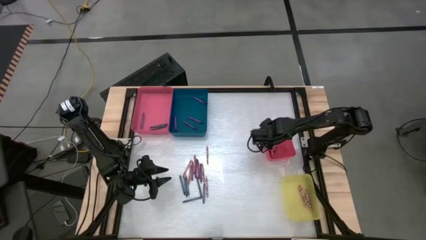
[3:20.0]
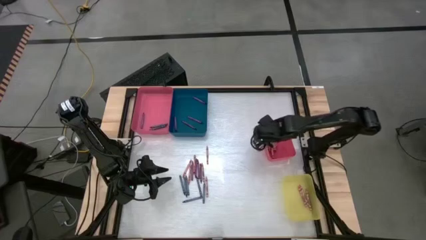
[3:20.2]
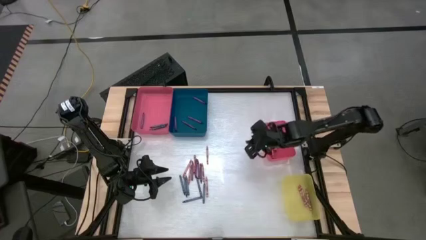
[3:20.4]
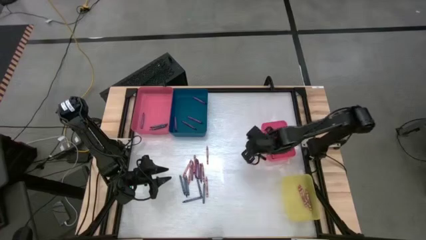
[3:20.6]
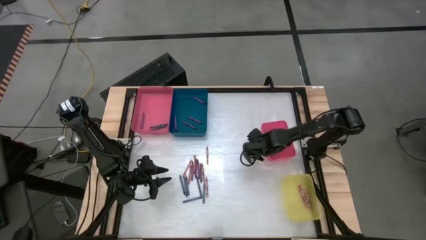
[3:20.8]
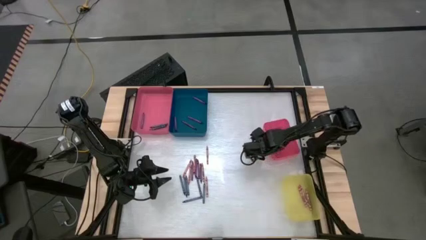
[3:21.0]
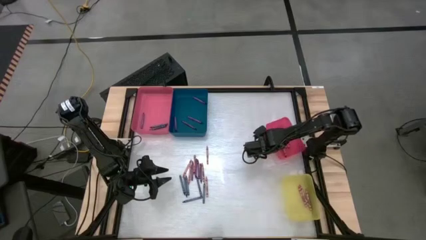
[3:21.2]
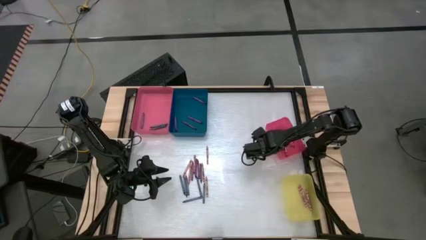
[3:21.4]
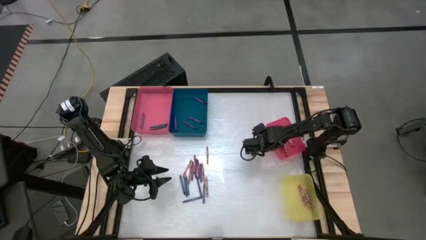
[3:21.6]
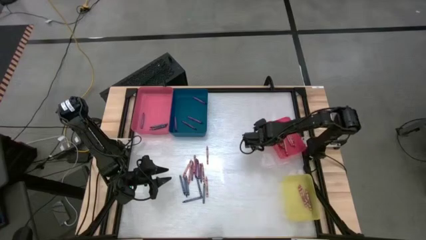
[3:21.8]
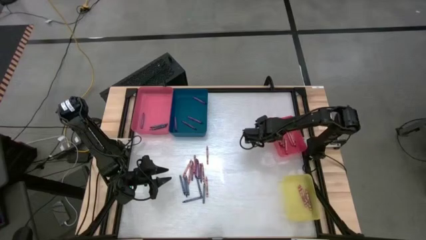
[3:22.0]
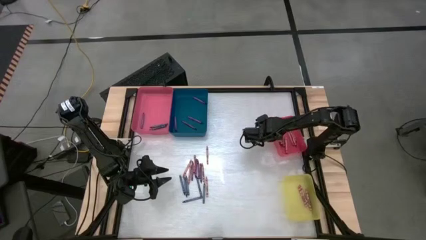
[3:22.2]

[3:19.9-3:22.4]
Task: Sort crayons
Adjust the small red bin

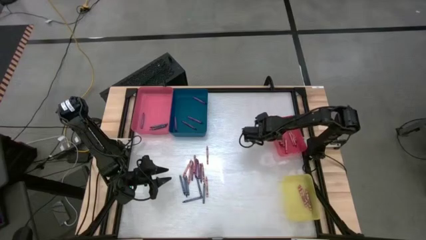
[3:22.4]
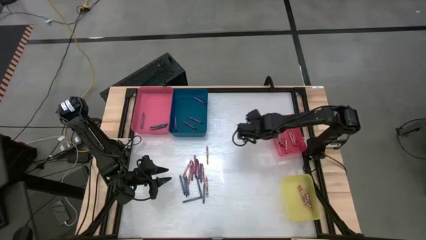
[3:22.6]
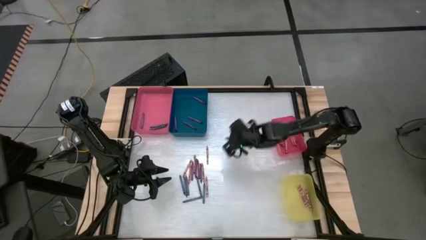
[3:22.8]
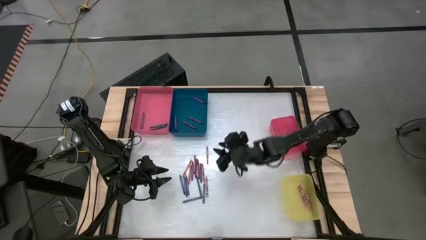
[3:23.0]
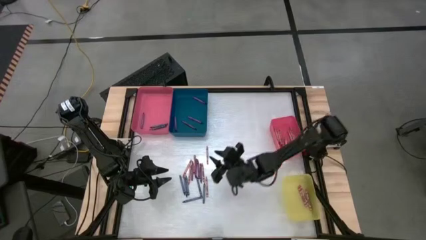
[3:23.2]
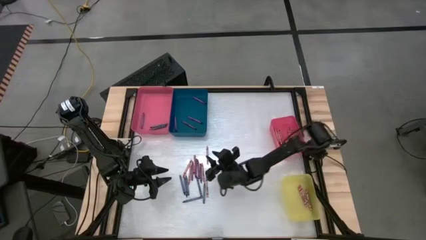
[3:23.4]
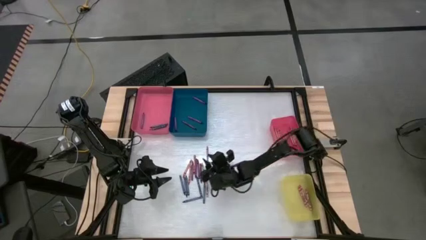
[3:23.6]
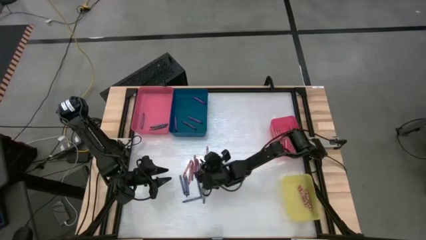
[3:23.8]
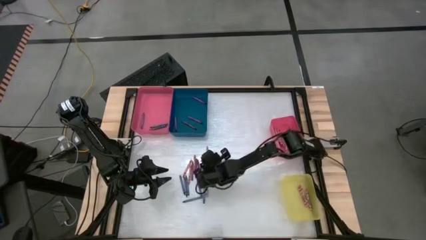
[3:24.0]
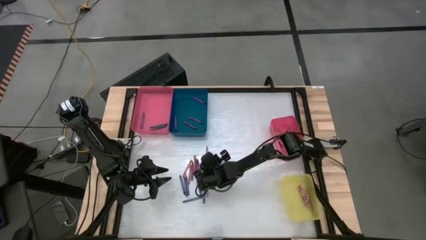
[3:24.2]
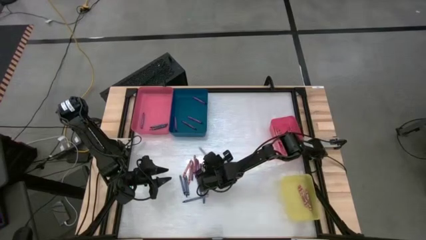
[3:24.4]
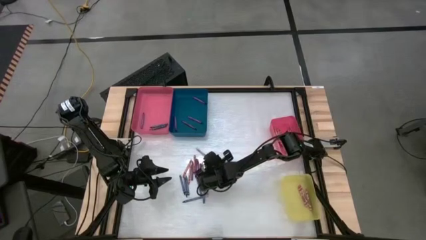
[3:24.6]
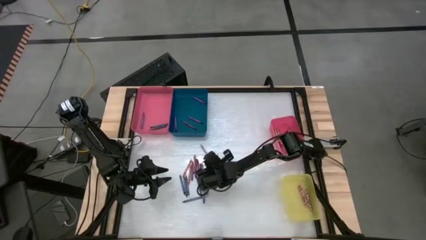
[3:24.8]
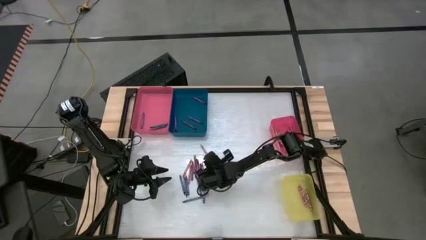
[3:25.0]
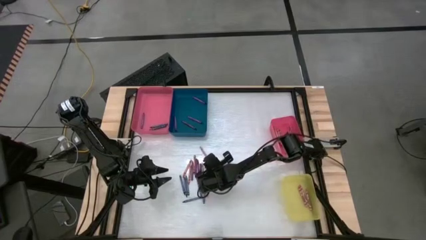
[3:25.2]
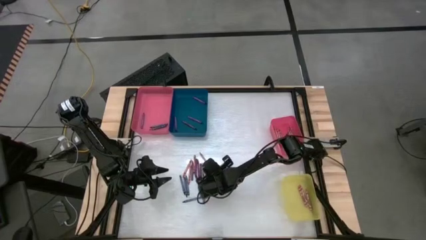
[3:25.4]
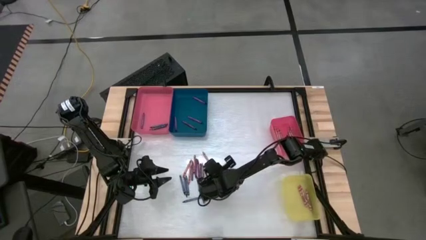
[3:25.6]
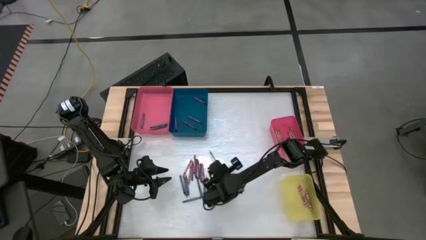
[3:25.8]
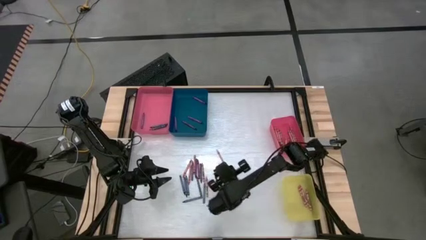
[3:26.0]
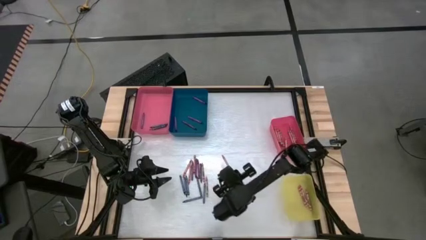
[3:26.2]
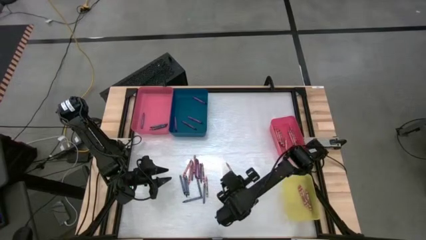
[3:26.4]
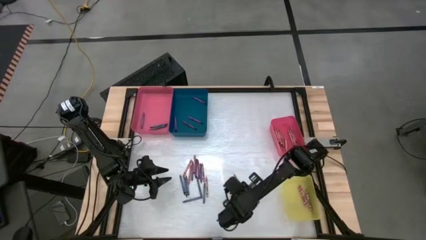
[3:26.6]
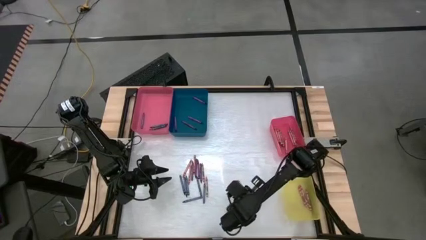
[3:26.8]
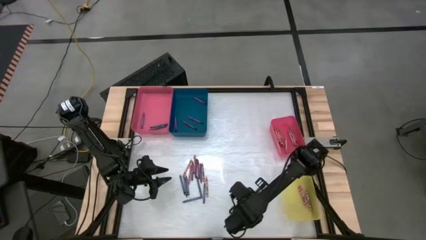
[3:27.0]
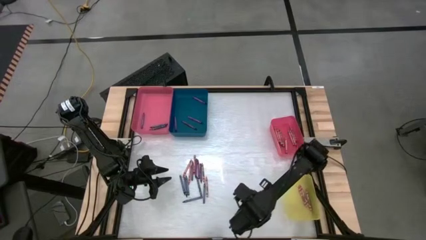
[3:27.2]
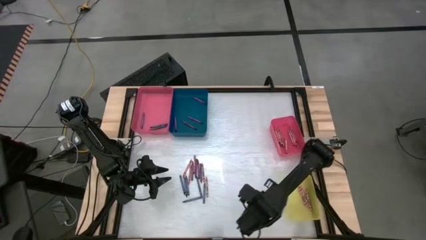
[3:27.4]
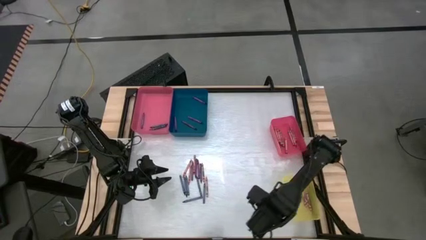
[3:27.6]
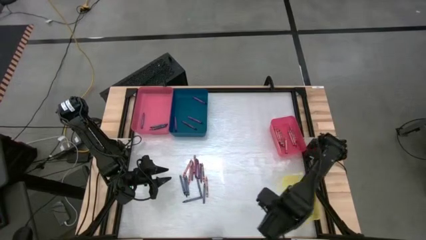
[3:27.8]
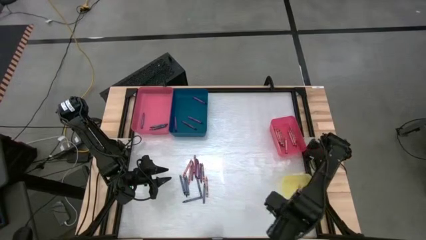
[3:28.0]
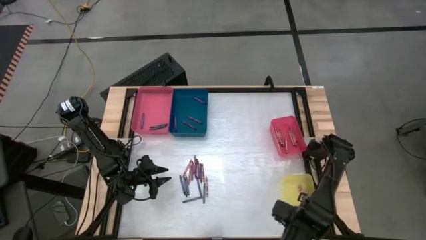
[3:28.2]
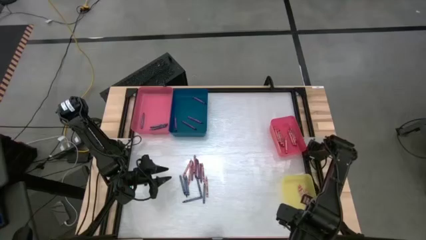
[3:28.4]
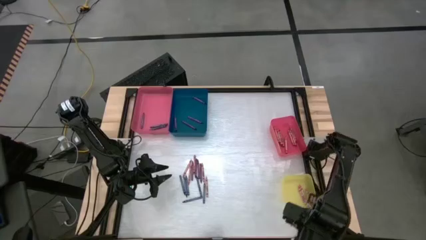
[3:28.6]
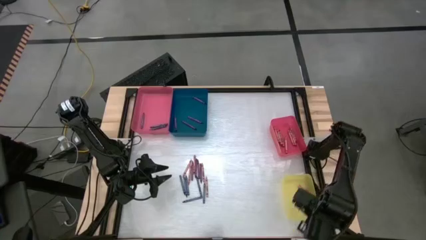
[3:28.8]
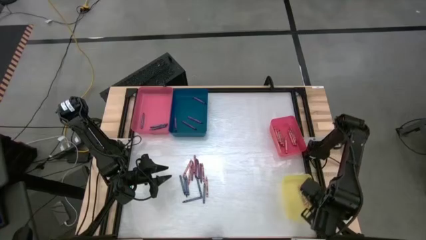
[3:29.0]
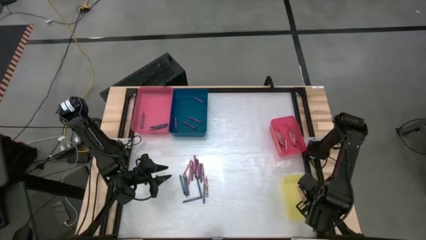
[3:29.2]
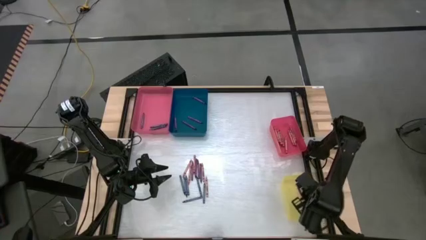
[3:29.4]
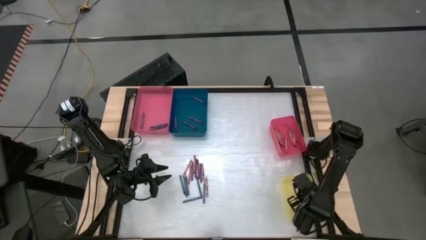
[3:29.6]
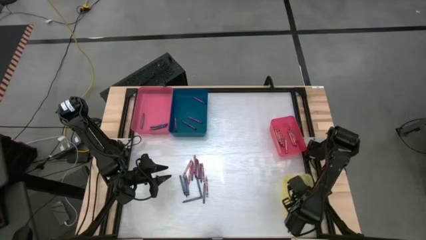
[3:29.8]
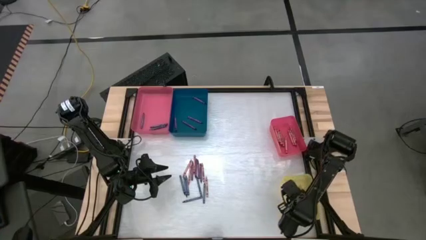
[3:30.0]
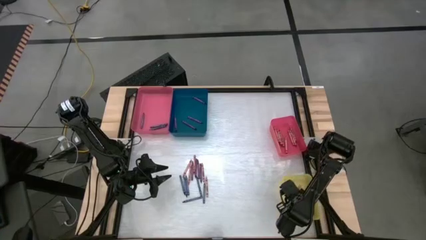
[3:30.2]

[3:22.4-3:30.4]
Put the pink crayon into the yellow bin

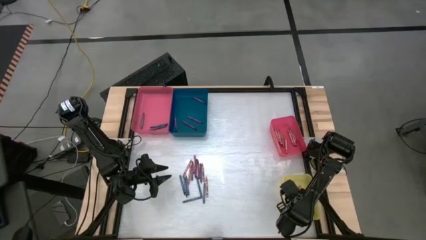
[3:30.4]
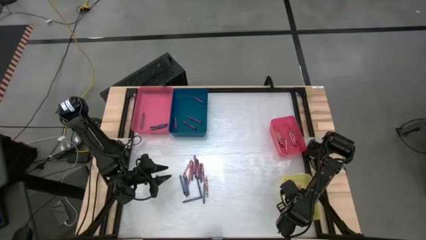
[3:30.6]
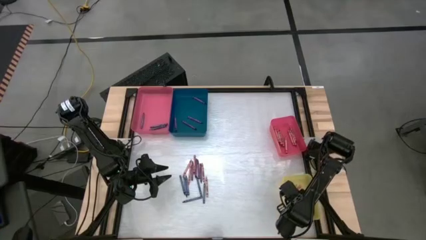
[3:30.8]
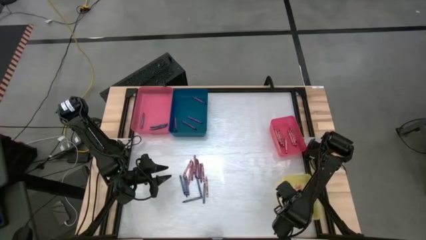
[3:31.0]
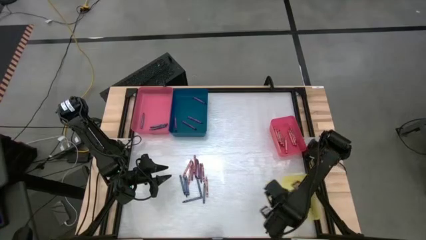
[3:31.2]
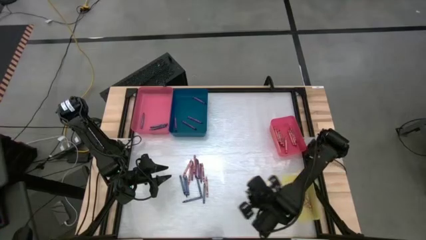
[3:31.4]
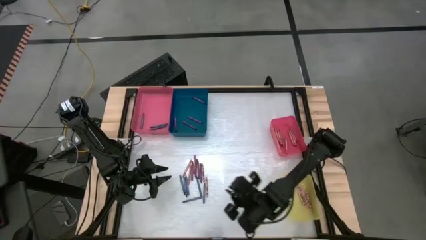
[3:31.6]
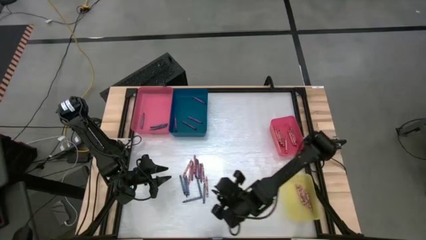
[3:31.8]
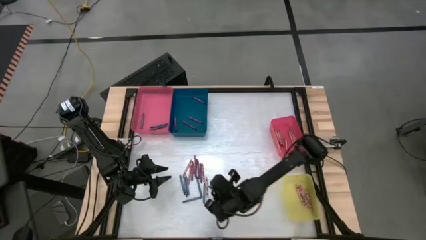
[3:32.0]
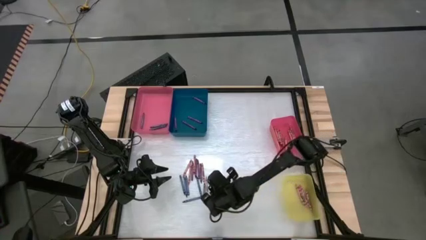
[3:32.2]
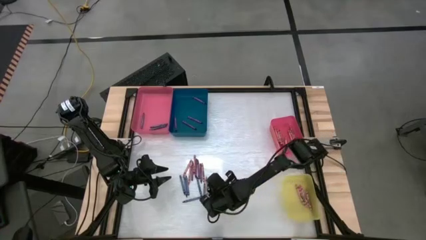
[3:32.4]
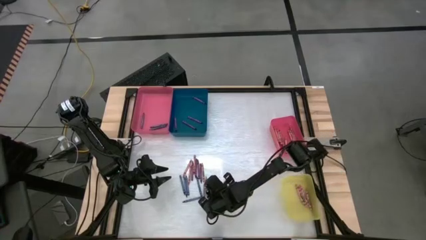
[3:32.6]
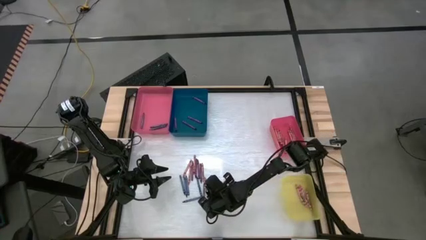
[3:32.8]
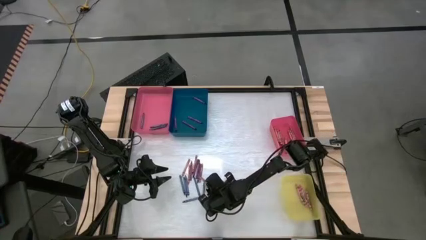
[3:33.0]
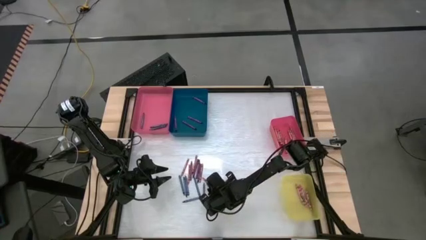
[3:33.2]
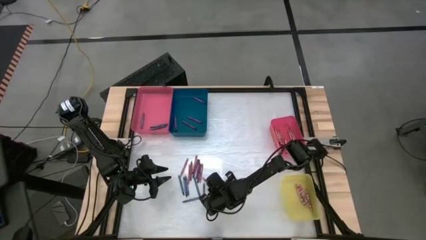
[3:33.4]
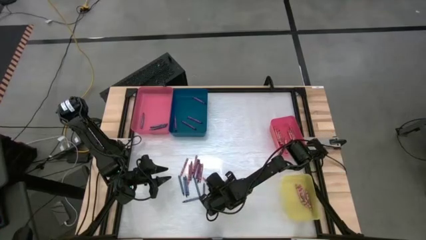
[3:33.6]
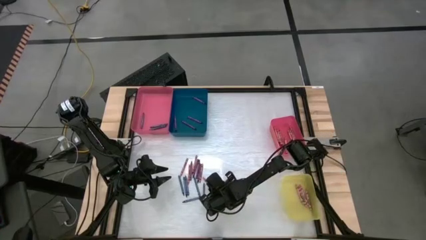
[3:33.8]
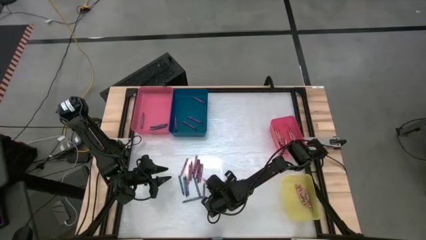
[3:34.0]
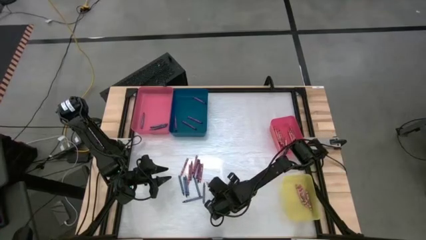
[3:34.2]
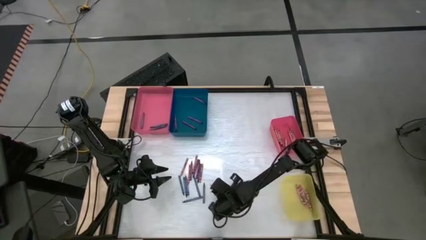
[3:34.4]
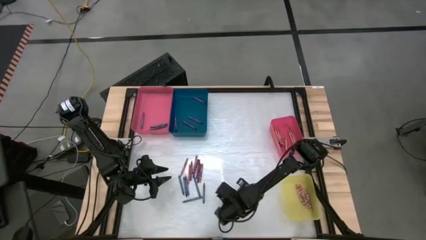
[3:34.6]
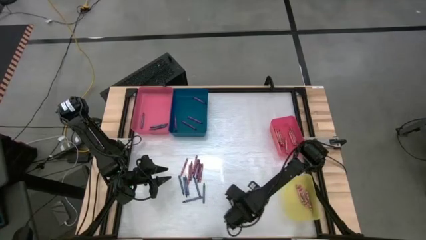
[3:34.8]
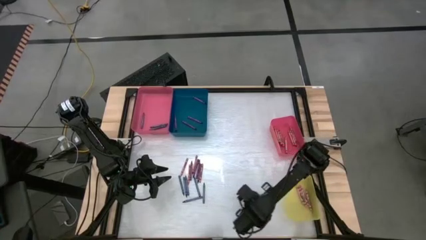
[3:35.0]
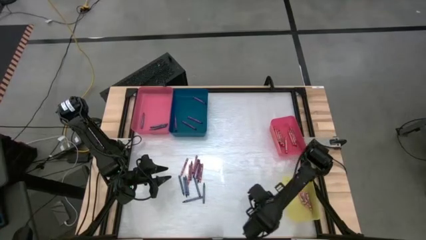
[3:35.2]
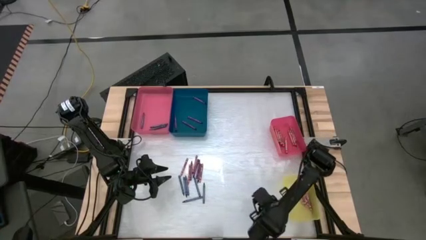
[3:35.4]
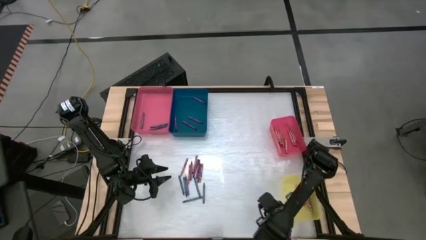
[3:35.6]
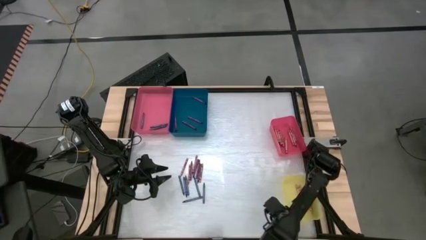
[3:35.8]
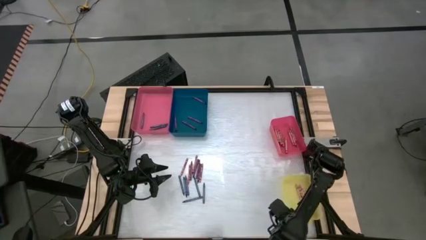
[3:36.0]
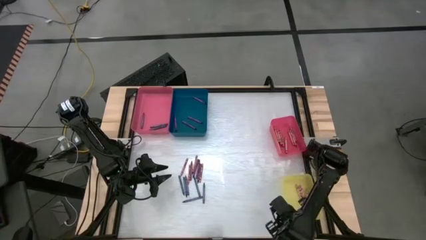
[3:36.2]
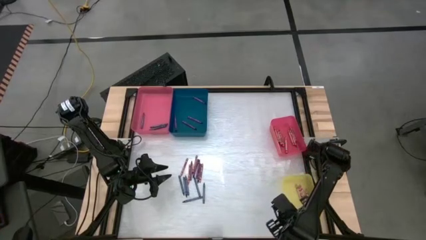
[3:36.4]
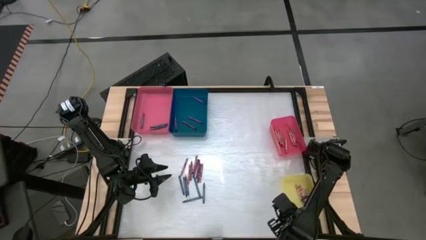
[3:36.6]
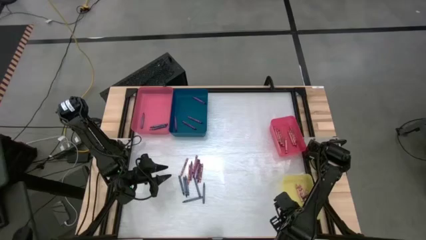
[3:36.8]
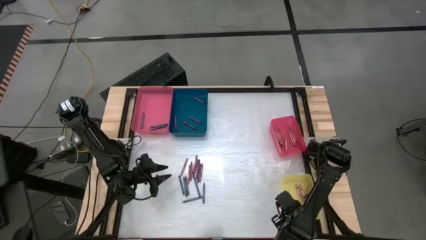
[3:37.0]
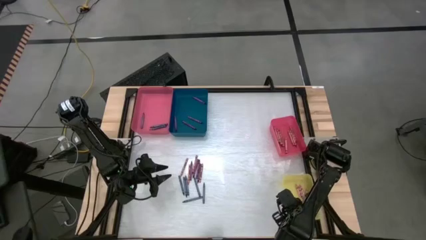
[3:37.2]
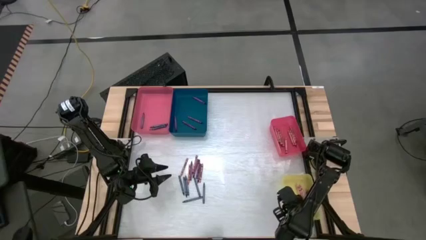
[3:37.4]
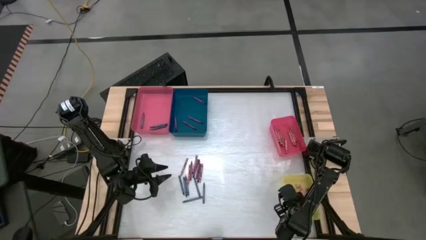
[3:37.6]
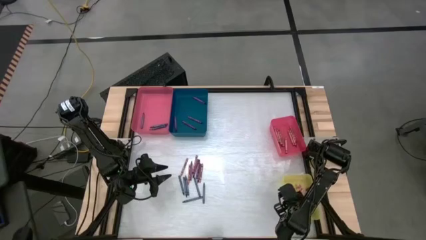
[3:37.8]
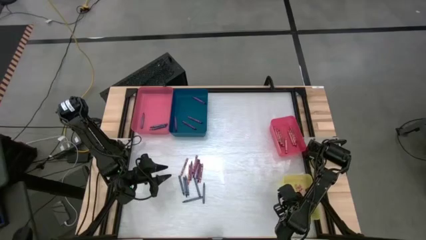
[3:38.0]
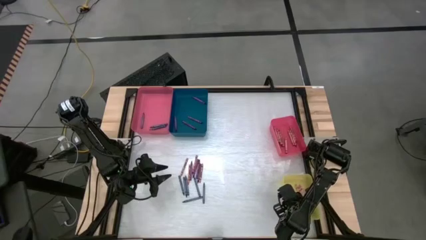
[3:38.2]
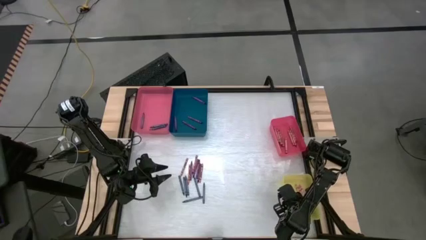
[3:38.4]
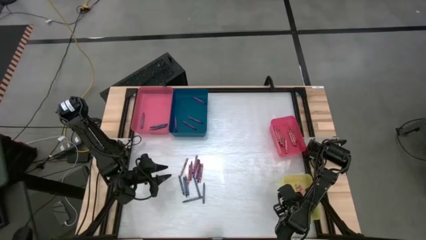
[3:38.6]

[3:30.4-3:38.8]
Put the pink crayon into the yellow bin
